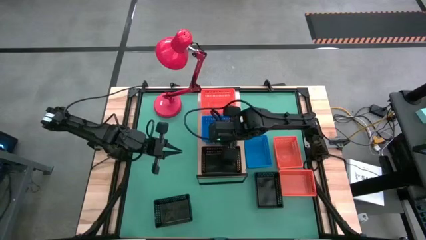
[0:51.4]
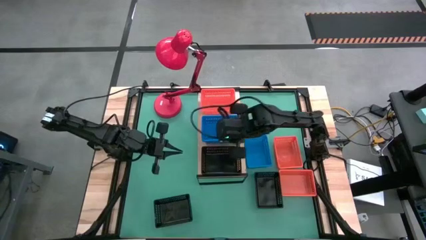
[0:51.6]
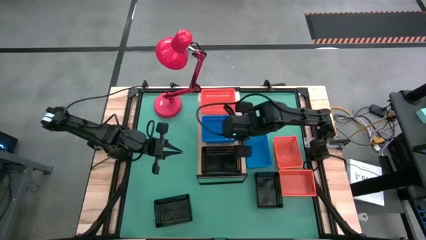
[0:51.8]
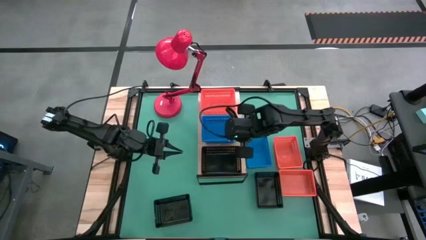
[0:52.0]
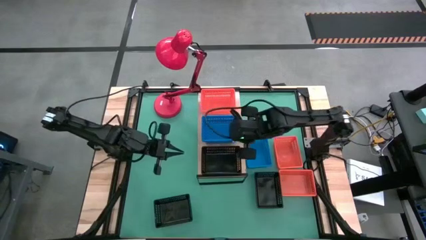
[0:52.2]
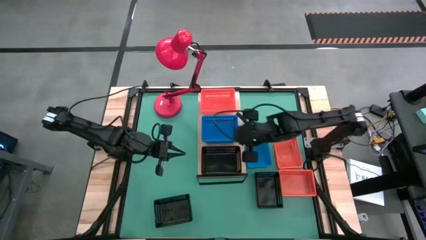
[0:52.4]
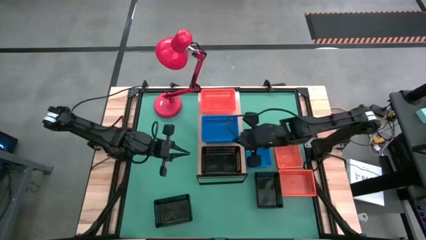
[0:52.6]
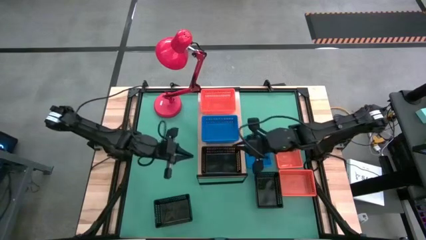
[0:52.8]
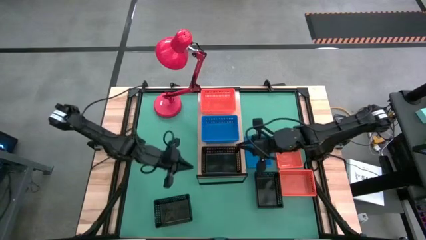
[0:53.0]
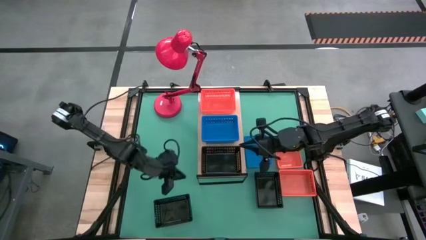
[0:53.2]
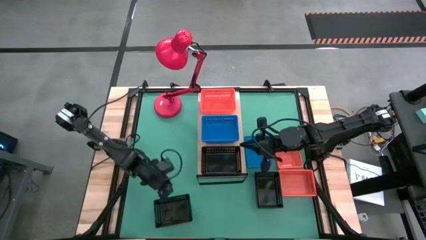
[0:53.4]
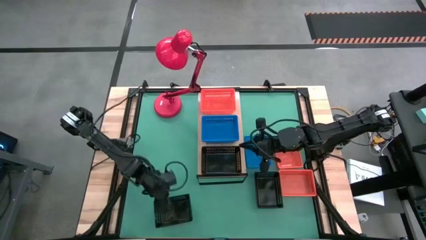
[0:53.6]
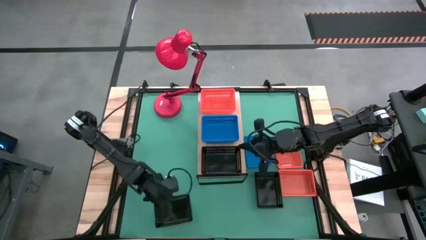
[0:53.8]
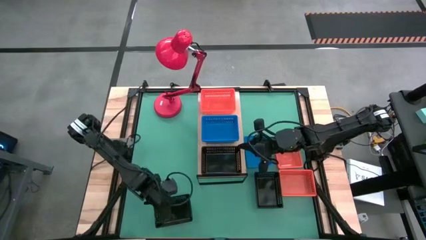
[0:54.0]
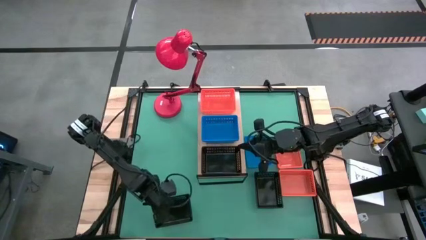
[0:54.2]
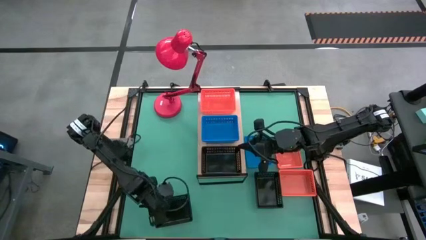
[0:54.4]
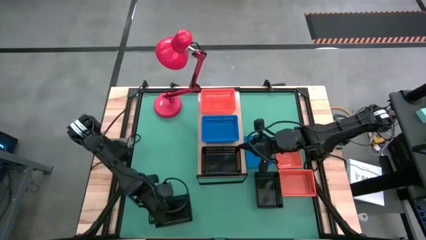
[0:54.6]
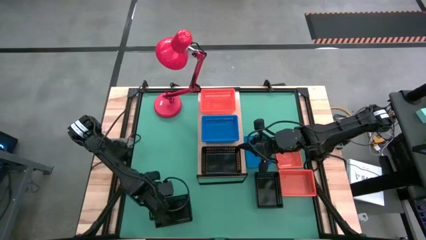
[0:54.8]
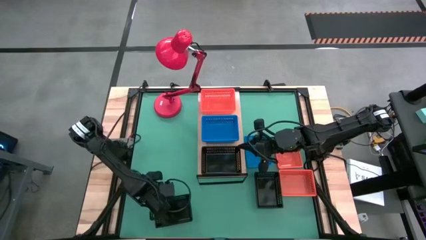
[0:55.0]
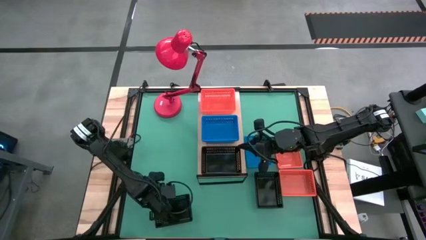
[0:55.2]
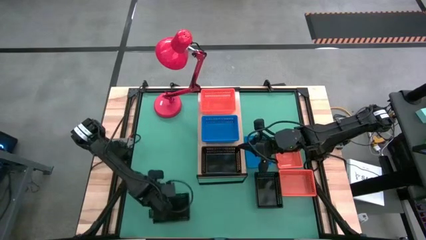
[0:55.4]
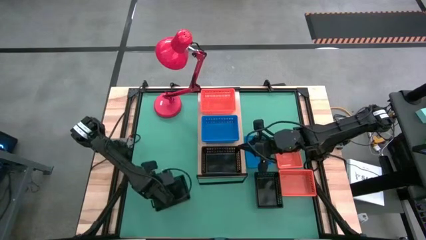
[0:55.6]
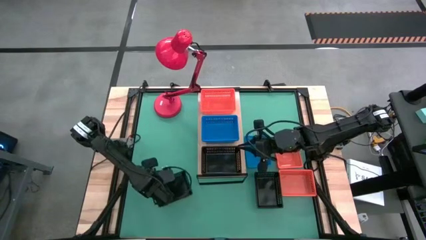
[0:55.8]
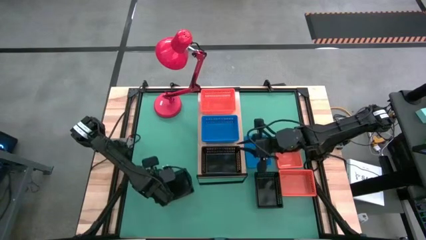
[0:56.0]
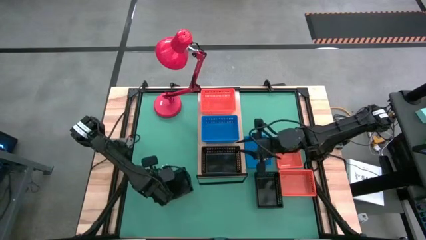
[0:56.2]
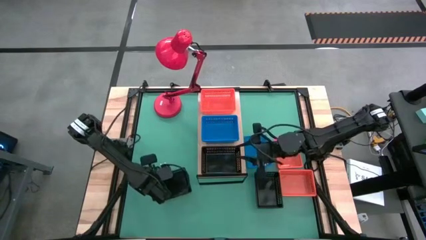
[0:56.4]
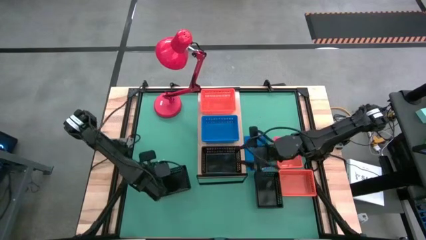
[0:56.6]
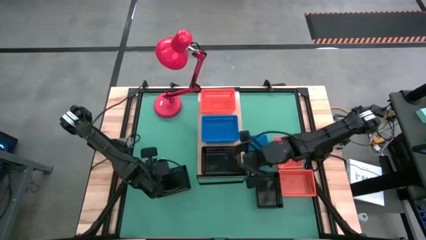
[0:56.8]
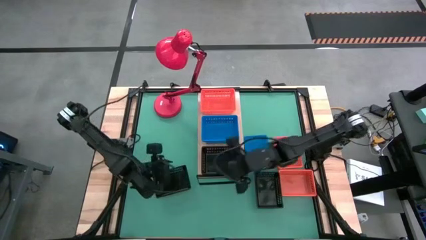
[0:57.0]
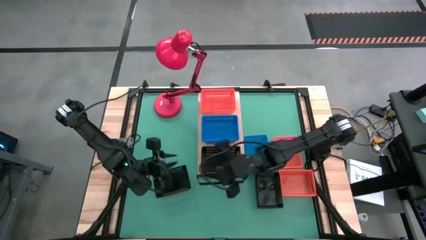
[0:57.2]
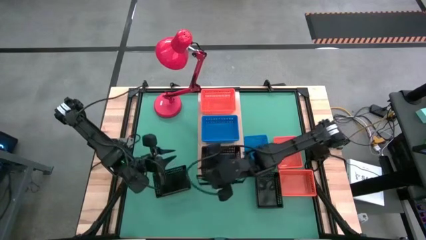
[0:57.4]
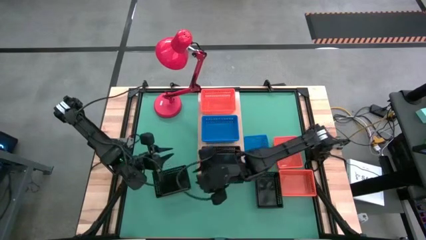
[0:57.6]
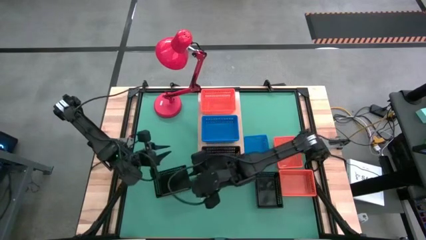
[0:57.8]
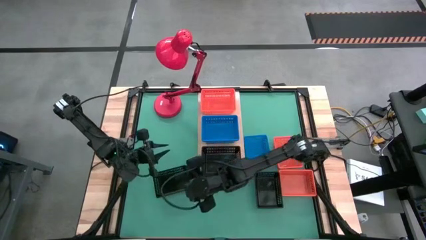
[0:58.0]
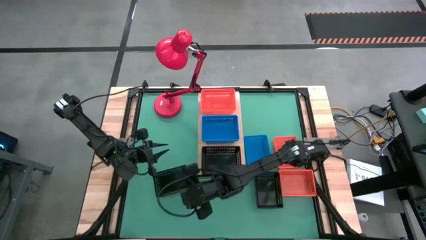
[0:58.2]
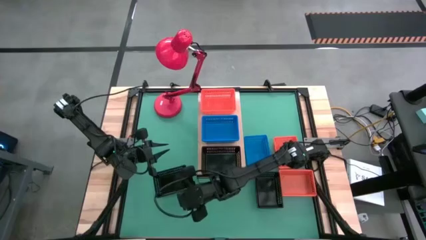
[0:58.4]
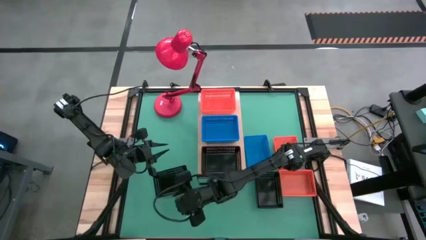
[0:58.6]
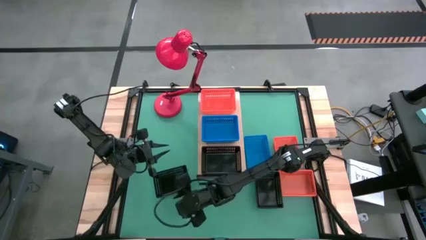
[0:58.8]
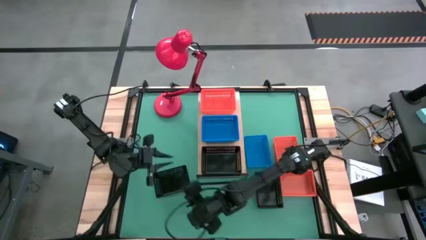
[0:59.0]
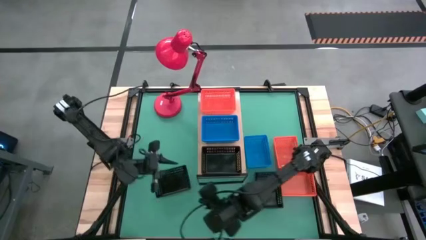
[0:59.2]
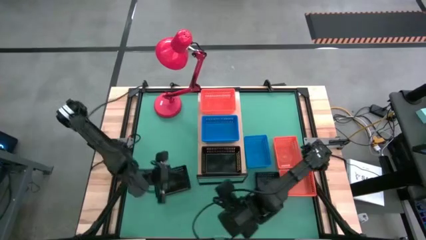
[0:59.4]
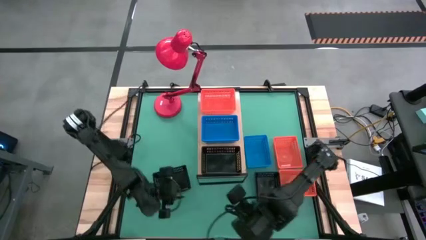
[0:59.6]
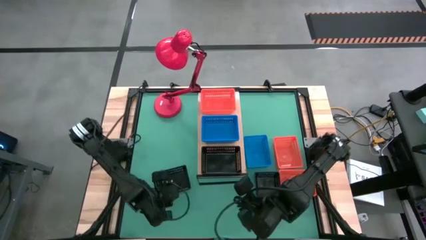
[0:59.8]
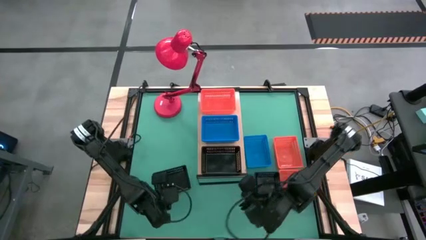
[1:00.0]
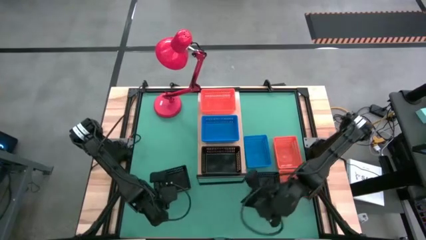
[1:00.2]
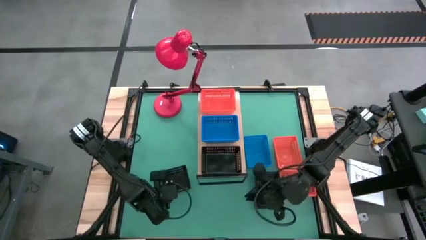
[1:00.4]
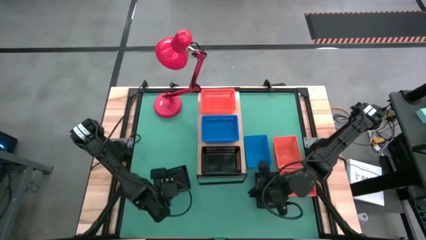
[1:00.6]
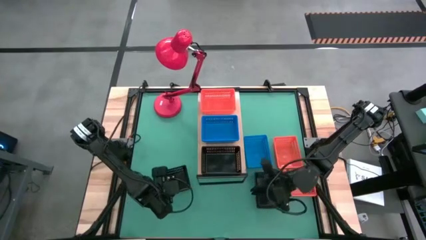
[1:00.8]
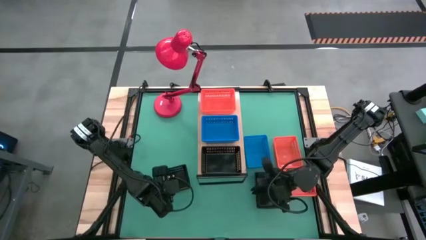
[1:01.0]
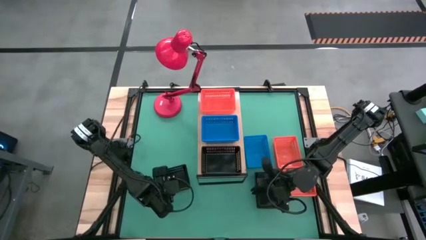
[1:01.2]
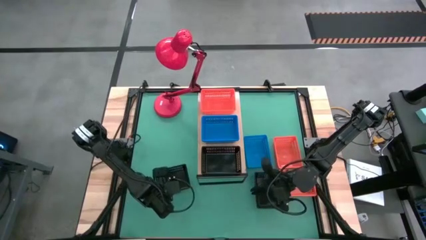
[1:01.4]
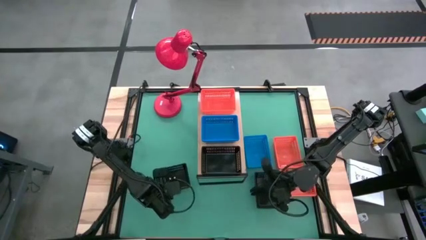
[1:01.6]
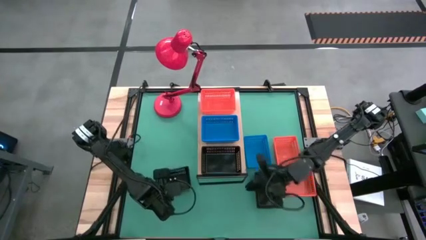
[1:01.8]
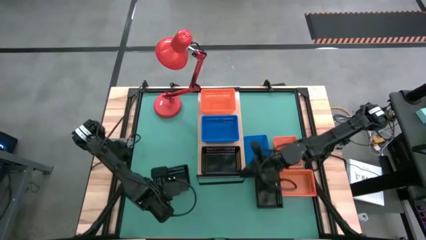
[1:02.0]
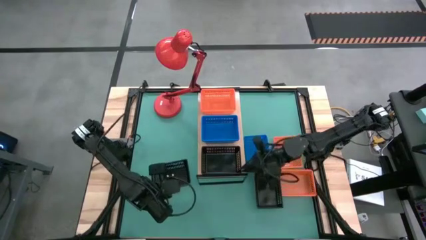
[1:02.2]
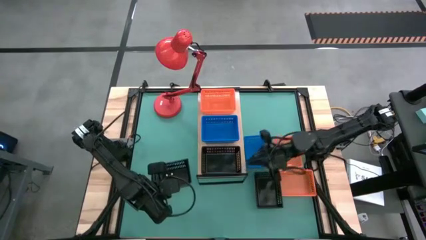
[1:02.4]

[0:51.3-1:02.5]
Task: Stack baskets on shelf by color
Stack the left black bin on top of the black bin on the shelf

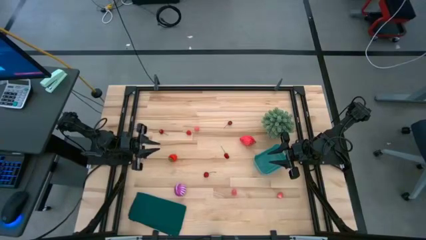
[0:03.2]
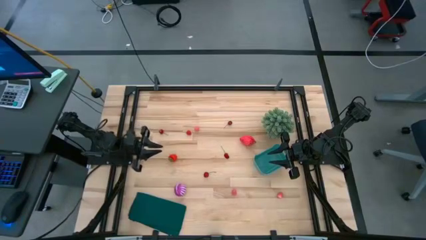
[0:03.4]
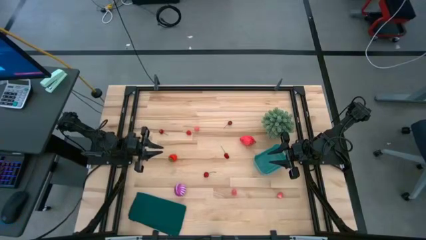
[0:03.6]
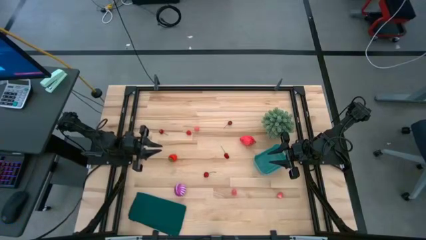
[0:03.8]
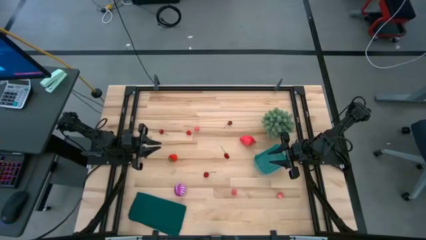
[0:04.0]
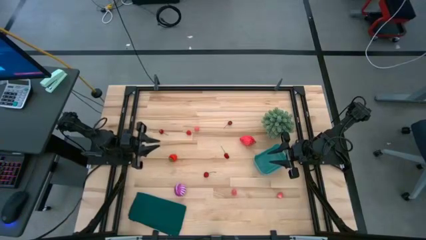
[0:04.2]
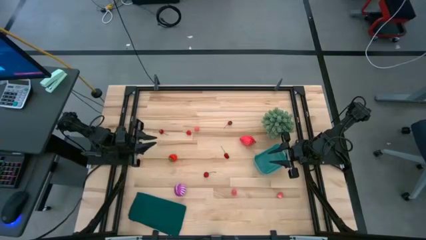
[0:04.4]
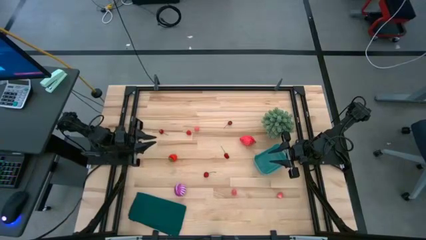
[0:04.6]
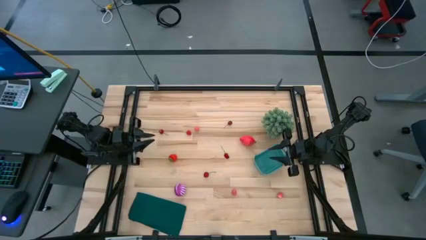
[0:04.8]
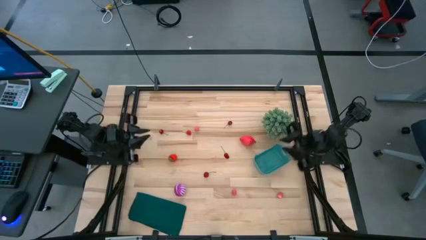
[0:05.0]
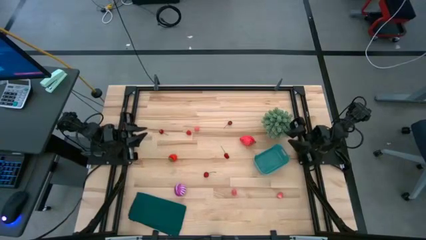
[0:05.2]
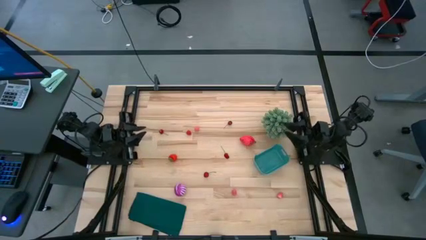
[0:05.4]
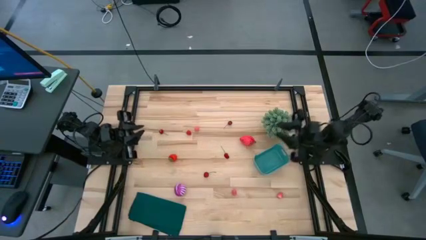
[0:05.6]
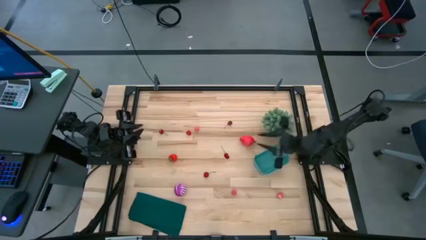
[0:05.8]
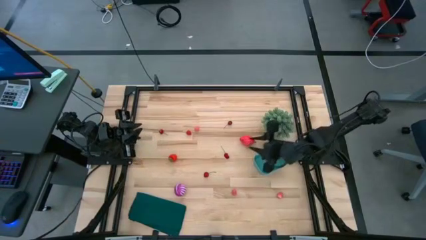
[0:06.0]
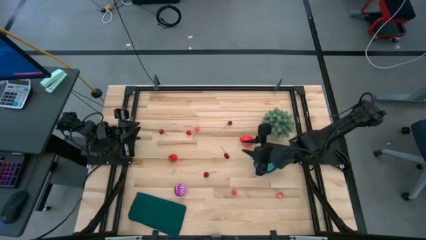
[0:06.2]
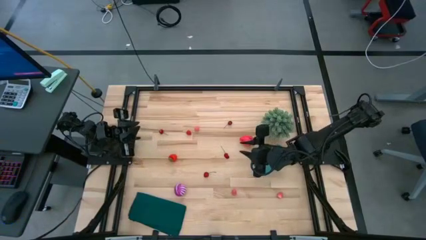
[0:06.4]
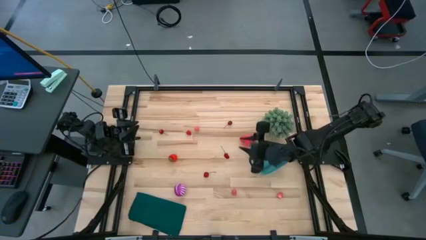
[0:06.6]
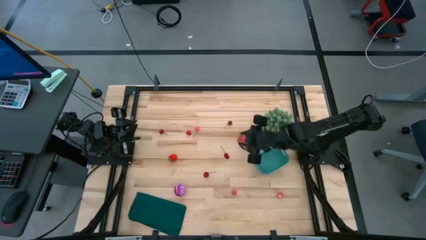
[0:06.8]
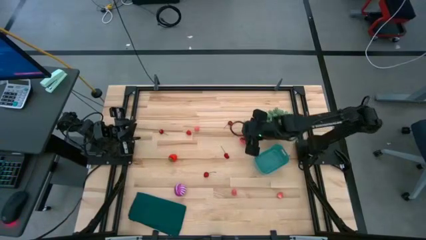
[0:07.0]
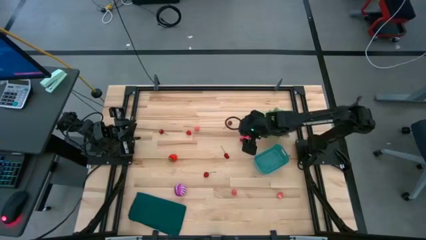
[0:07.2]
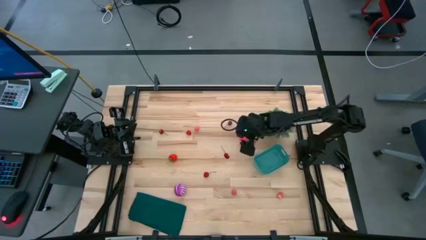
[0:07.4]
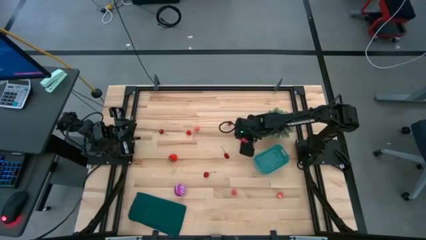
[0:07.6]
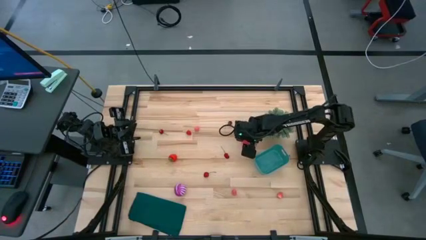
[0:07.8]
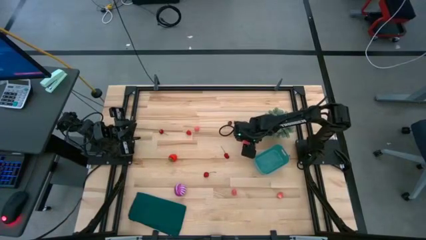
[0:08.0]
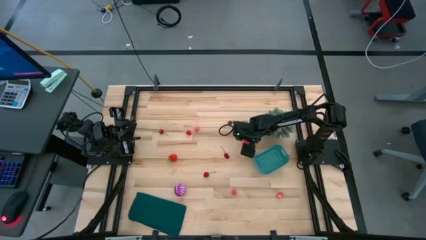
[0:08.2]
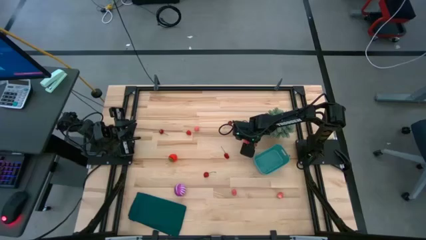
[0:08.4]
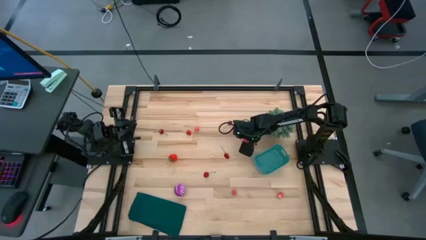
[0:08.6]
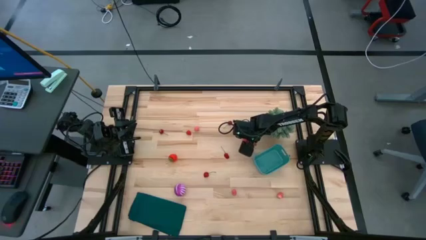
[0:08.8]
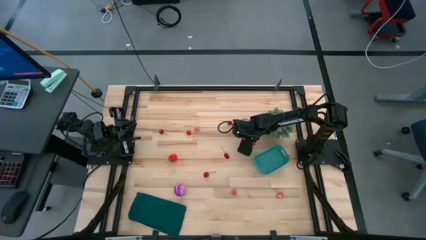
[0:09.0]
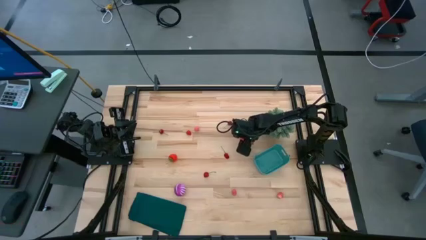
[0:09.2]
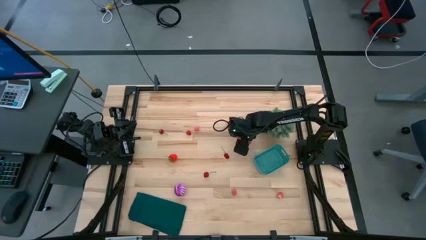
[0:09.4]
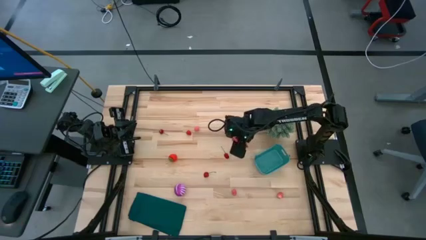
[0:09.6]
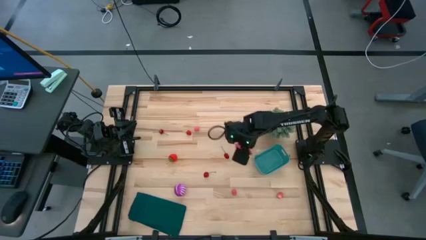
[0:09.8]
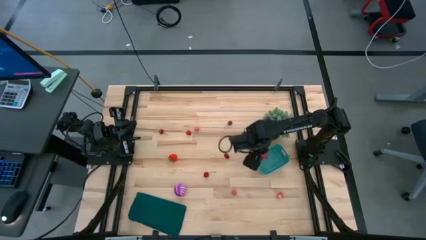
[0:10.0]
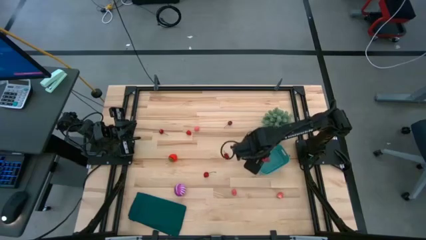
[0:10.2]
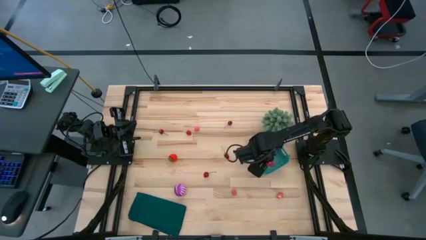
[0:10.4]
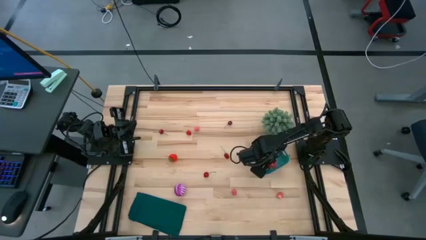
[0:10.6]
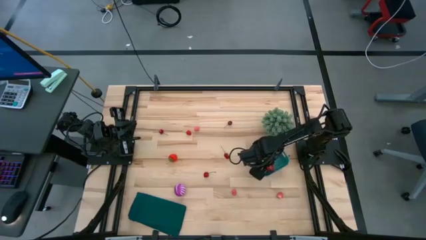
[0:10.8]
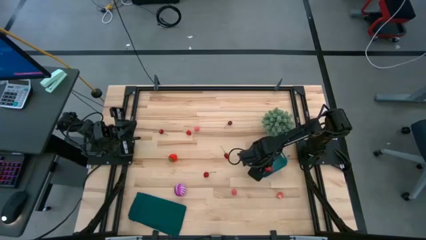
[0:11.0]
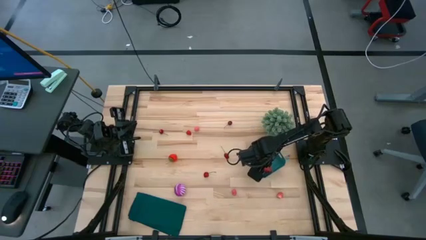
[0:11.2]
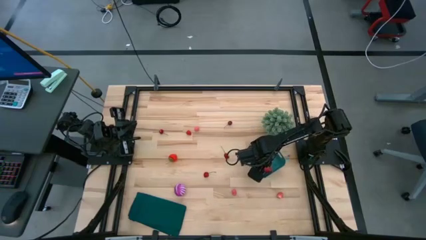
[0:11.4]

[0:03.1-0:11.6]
Task: Pick and placing Produce into tupperware
Put the red dragon fruit into the green bin
